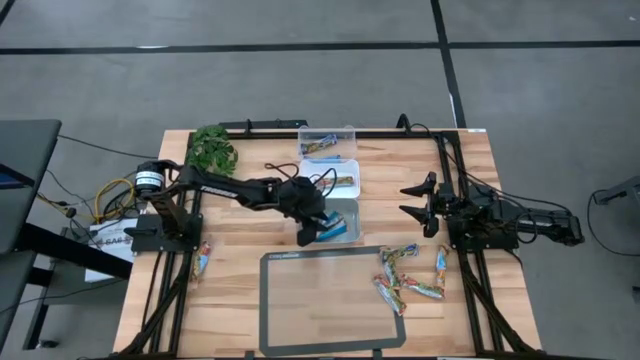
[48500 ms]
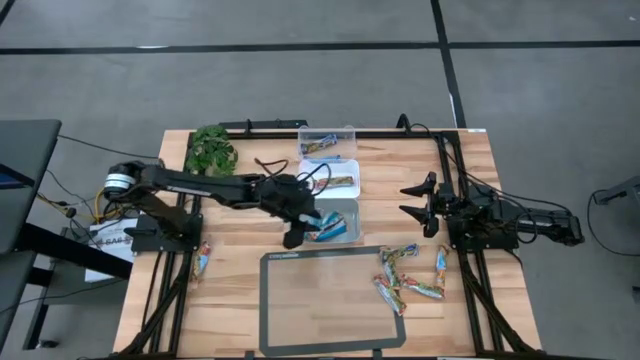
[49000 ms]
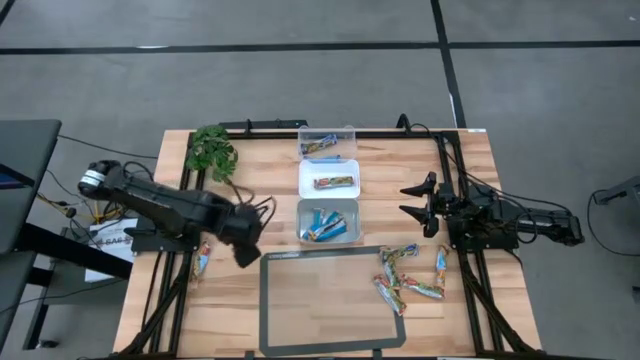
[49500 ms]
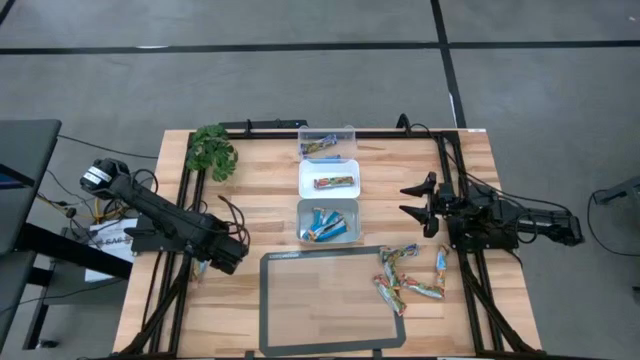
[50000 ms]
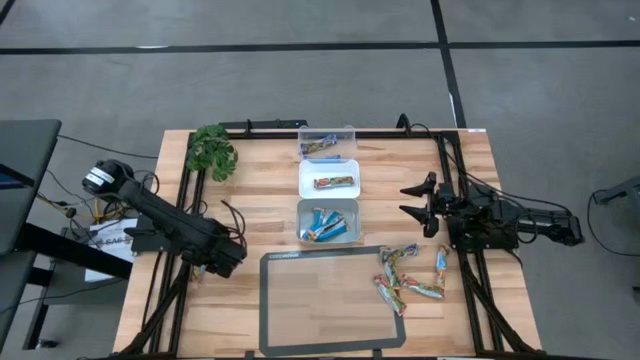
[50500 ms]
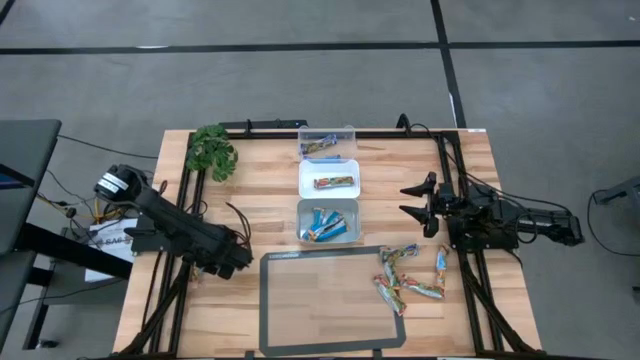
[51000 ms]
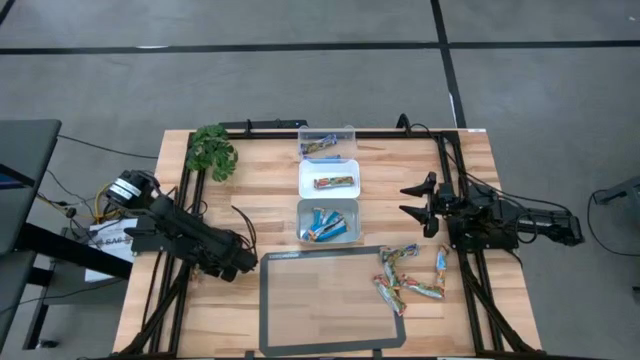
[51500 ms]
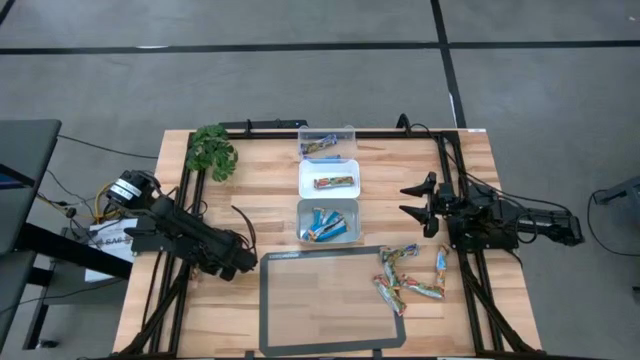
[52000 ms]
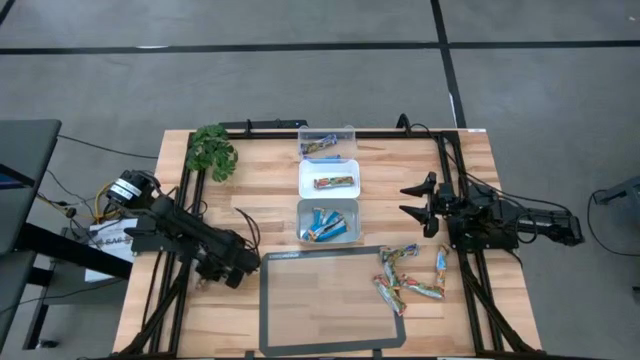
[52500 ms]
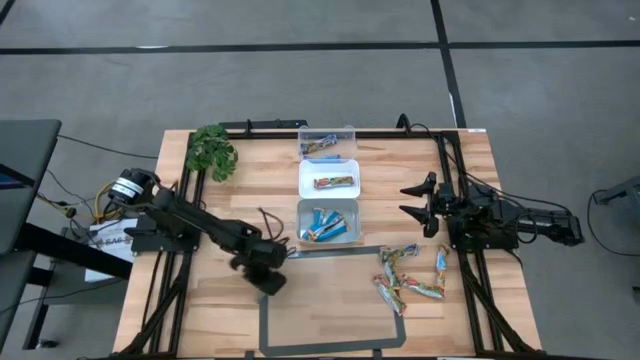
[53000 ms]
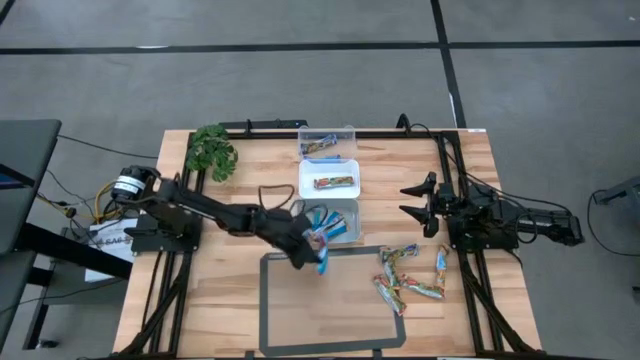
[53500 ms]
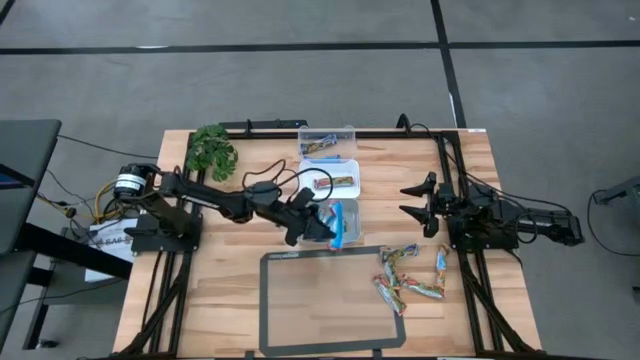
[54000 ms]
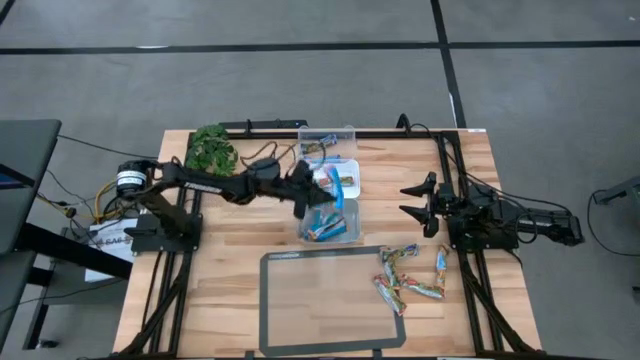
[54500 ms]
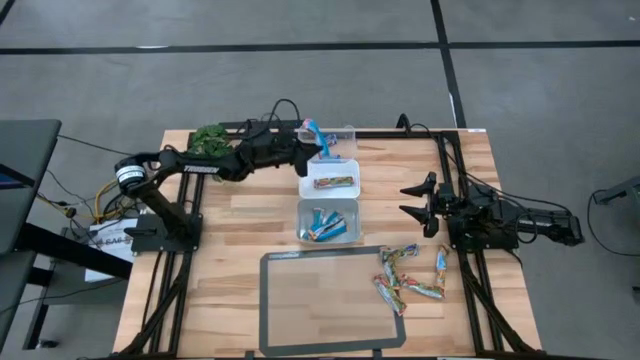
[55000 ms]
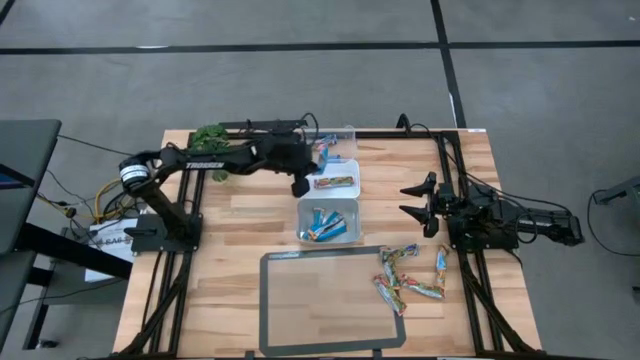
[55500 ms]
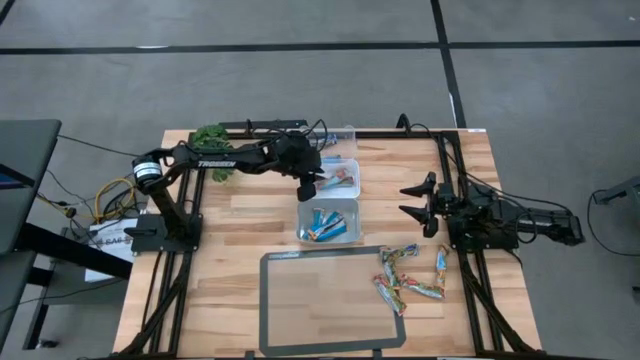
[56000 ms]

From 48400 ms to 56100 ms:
Task: Pick and place Granola Bars by type
Put the red granola bar into the white bin

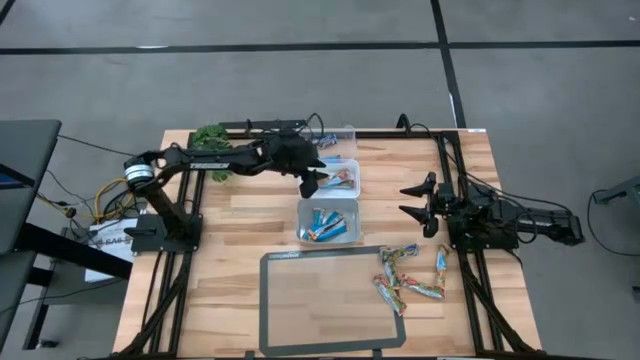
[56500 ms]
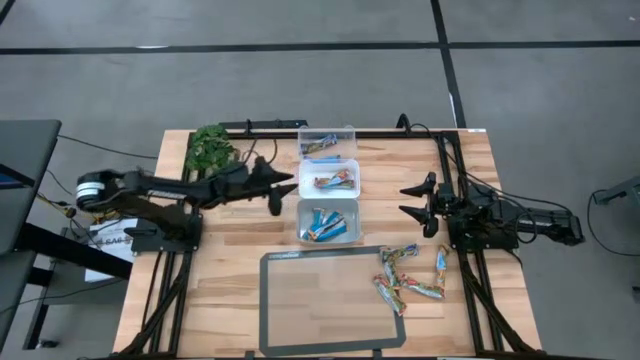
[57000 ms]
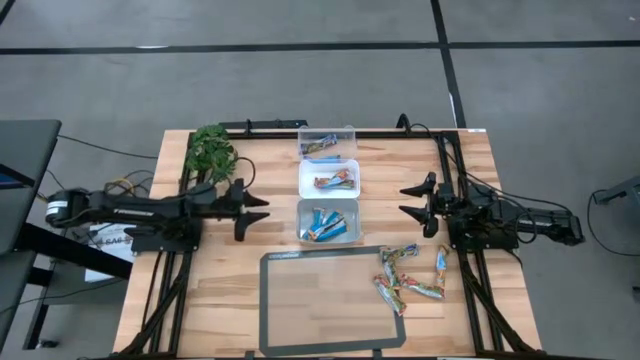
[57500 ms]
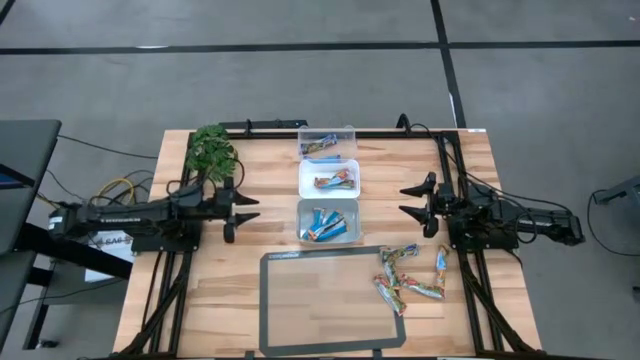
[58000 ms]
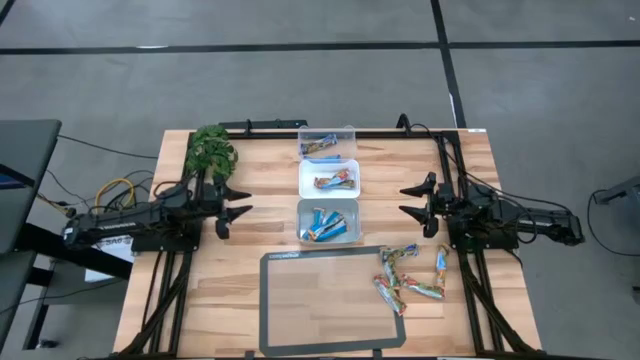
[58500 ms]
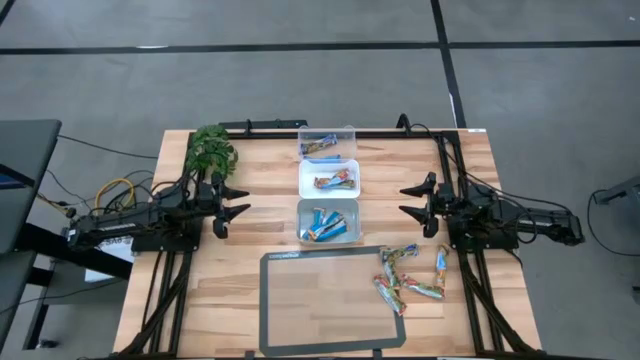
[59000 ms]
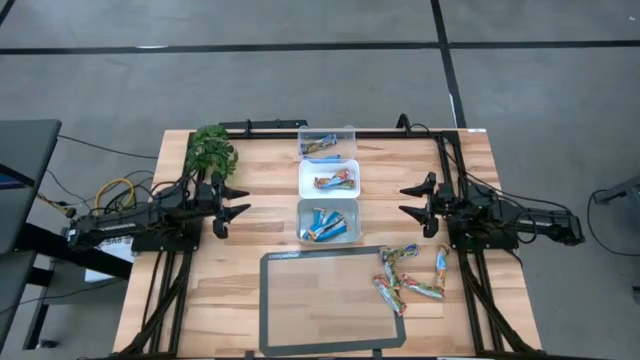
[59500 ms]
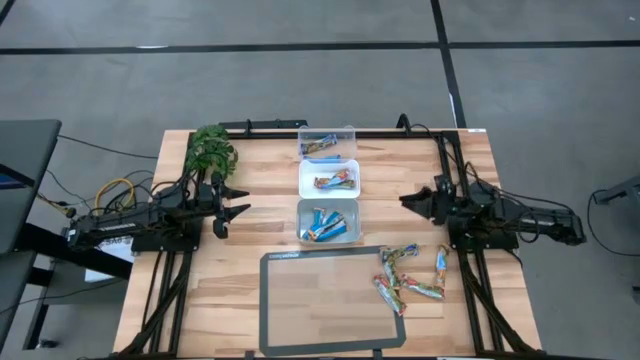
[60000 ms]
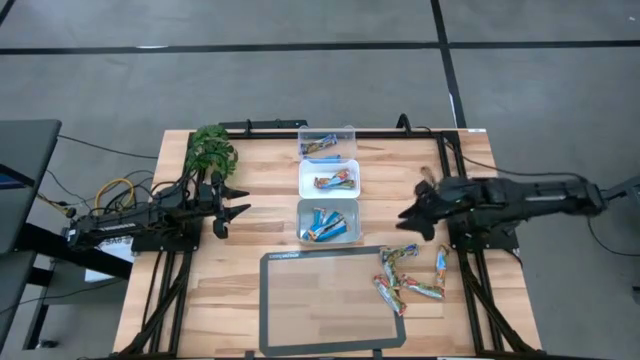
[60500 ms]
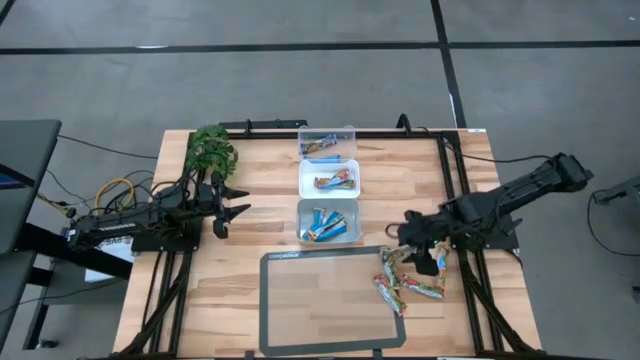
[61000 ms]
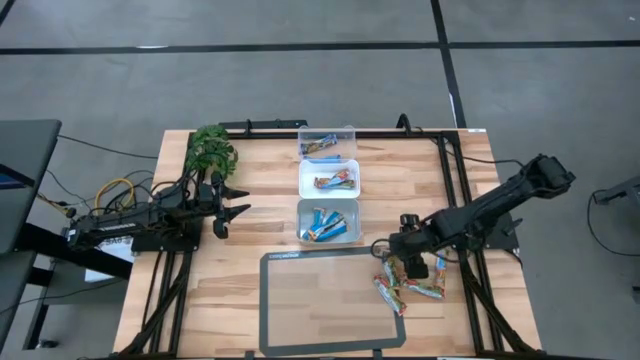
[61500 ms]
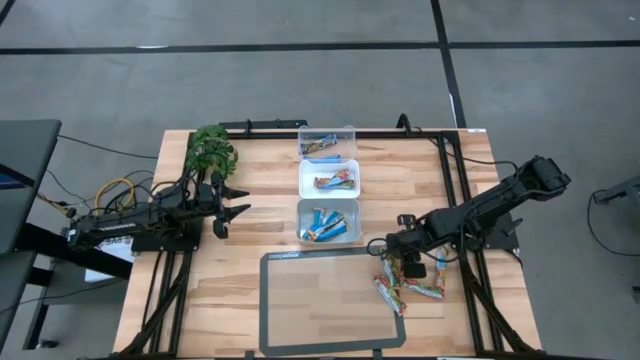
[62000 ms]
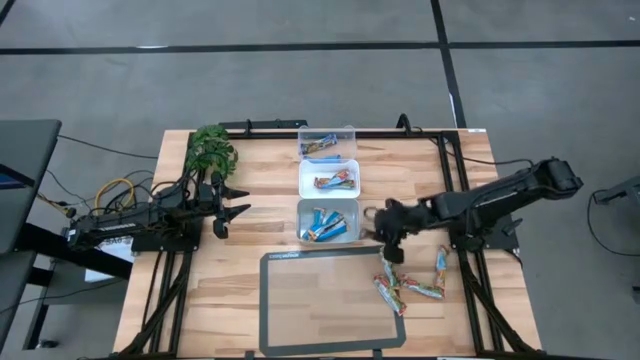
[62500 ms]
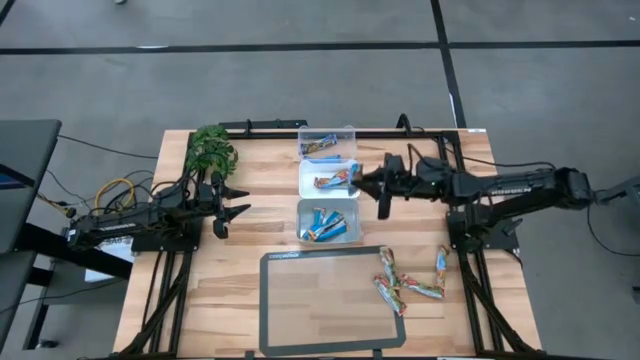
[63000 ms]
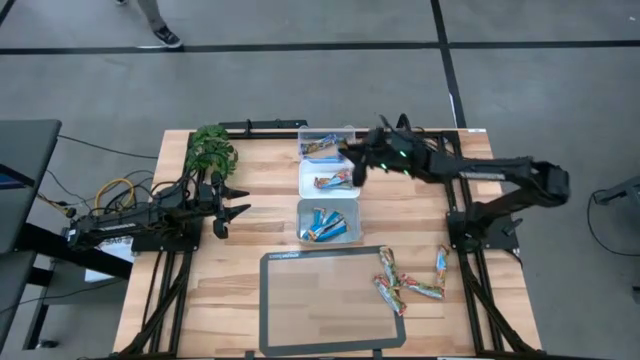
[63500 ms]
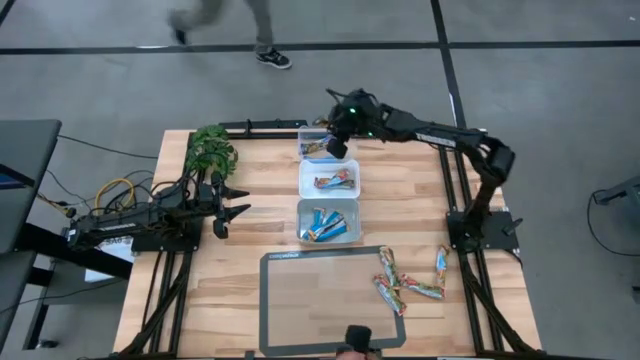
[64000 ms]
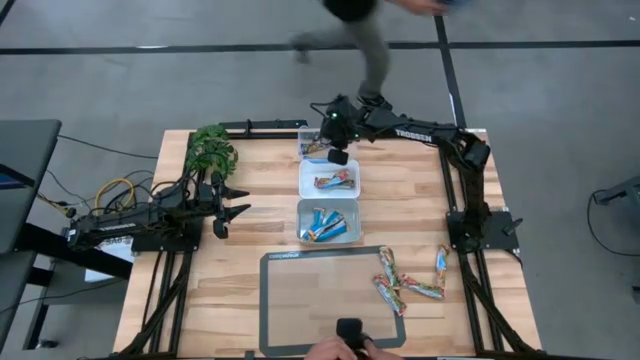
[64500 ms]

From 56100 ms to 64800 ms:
Put the blue granola bar into the transparent bin

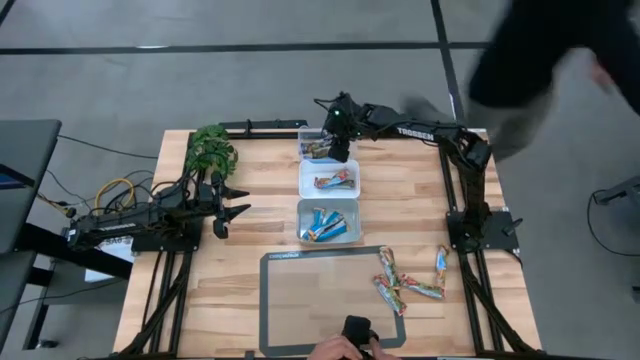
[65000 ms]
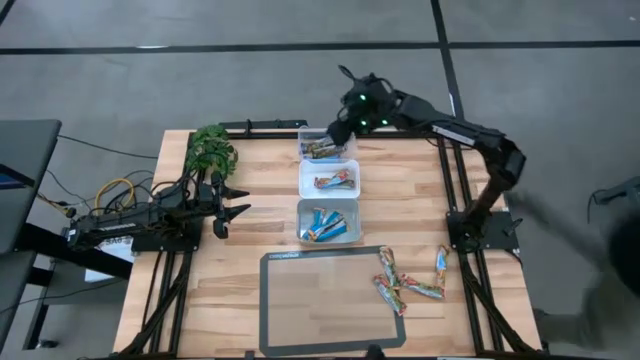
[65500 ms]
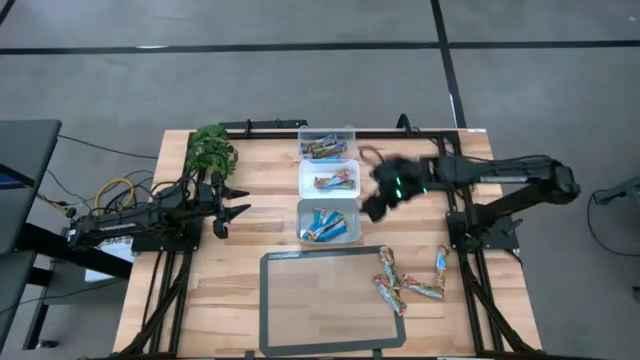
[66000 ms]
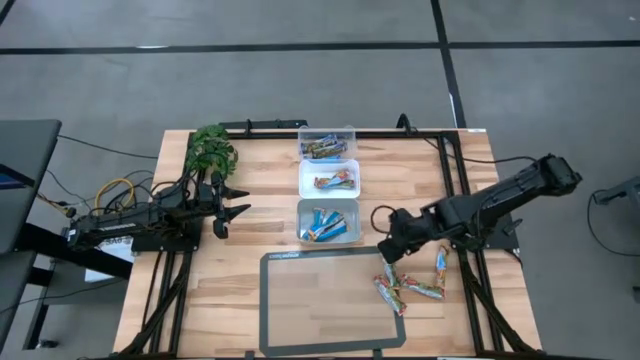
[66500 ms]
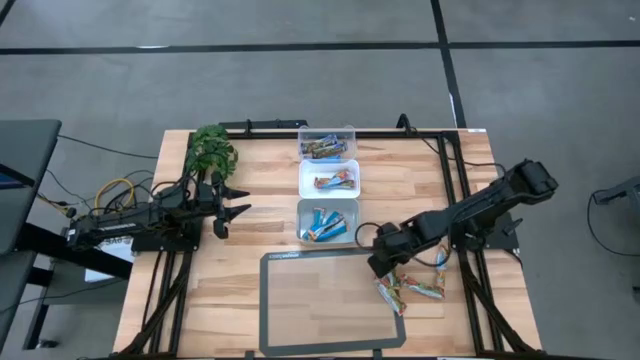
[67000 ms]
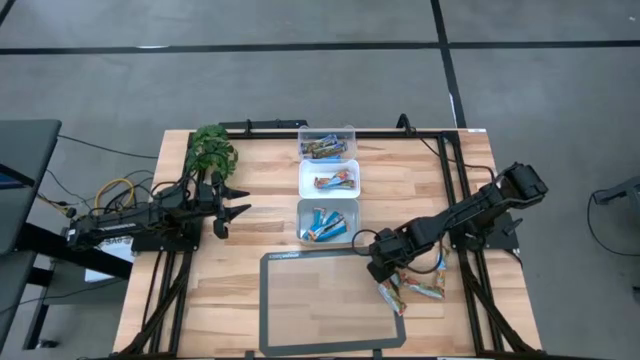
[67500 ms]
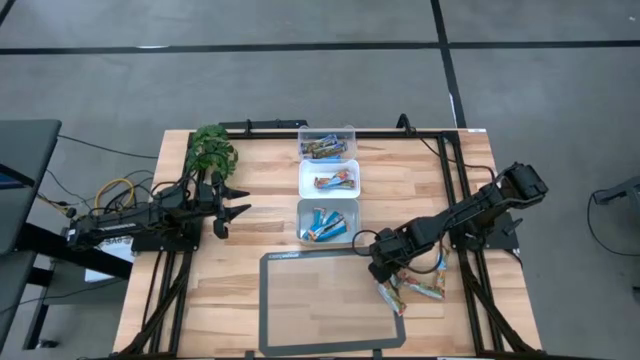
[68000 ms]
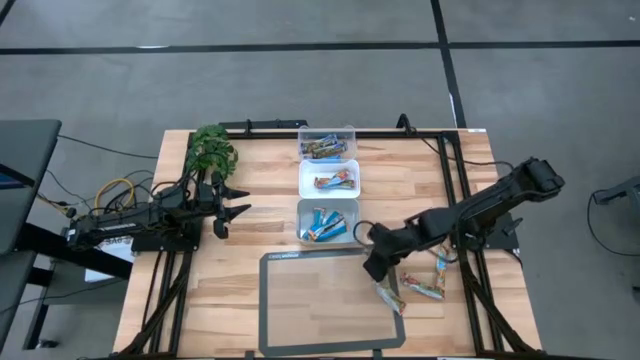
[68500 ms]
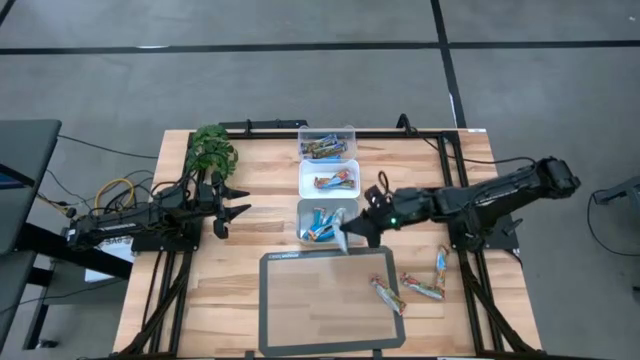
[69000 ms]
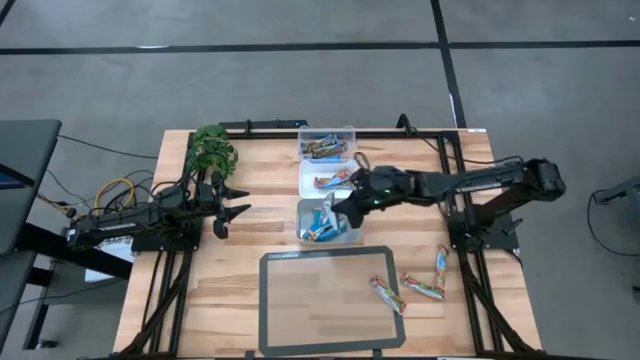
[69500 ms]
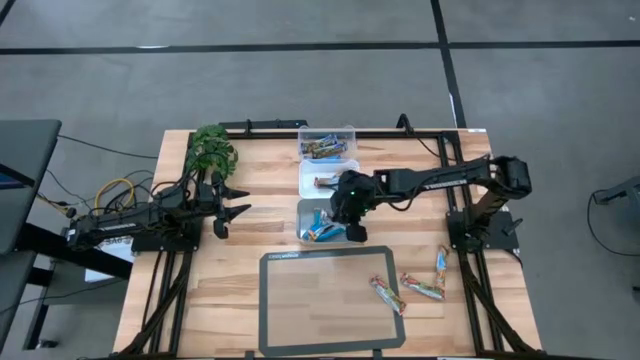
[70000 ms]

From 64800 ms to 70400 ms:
Put the orange granola bar into the gray bin
